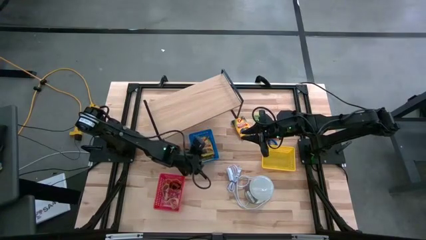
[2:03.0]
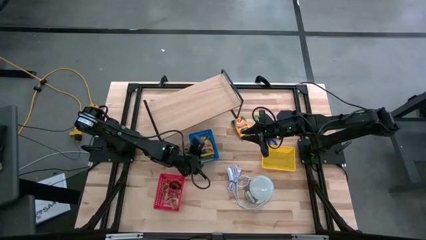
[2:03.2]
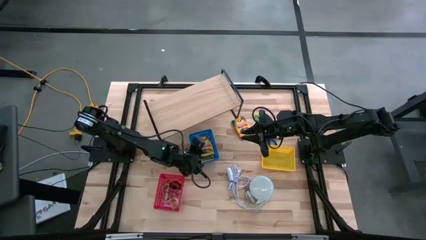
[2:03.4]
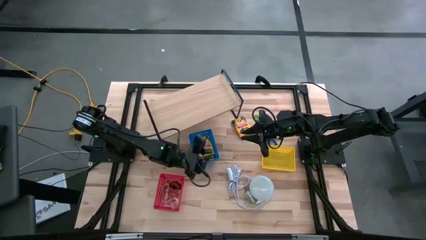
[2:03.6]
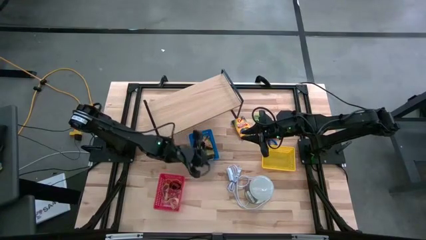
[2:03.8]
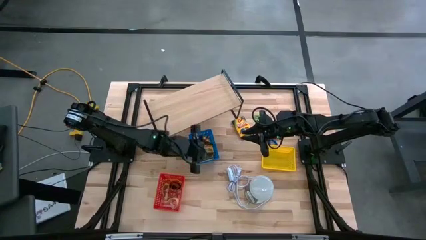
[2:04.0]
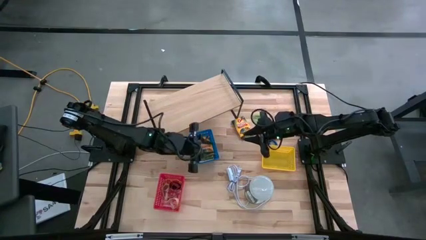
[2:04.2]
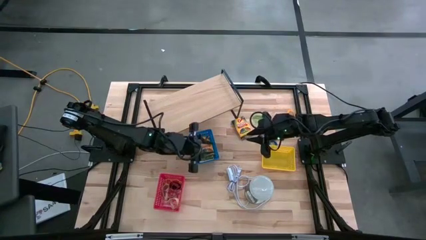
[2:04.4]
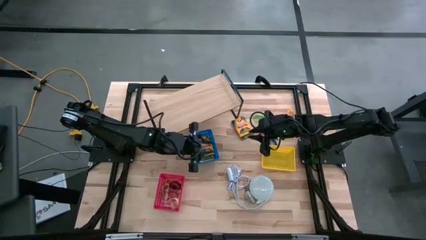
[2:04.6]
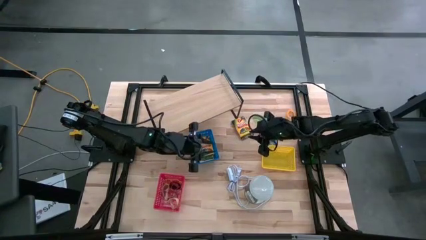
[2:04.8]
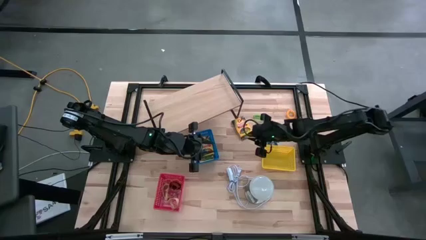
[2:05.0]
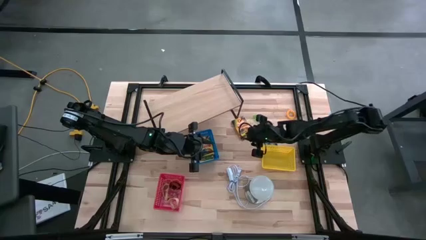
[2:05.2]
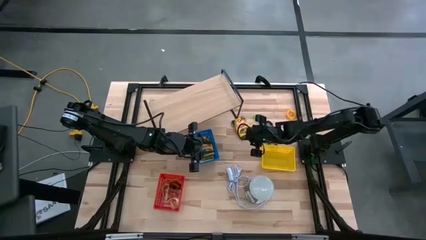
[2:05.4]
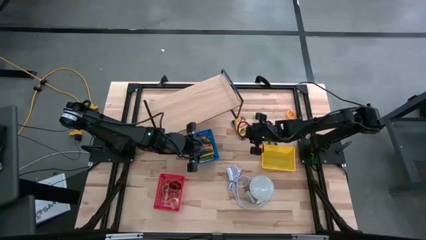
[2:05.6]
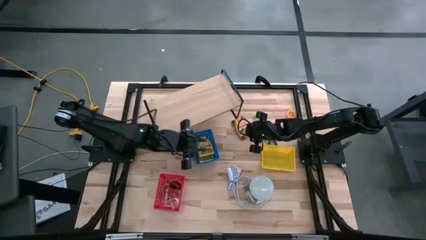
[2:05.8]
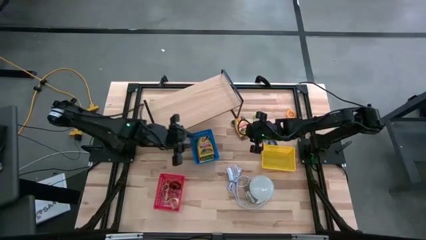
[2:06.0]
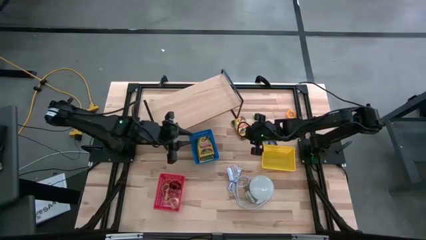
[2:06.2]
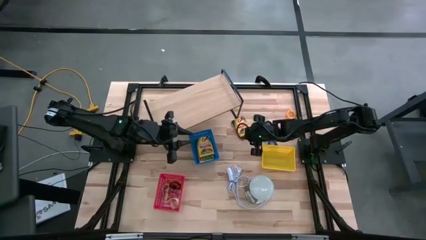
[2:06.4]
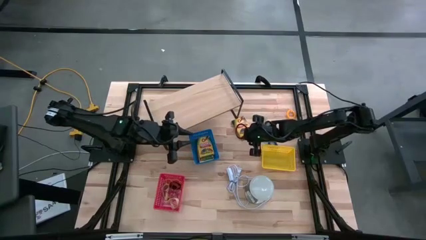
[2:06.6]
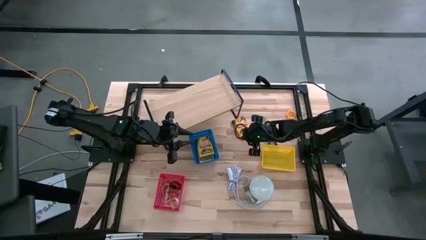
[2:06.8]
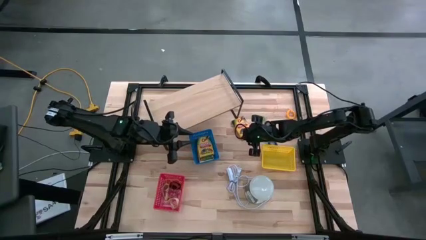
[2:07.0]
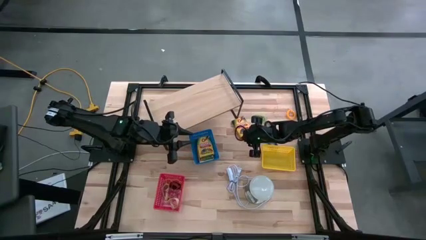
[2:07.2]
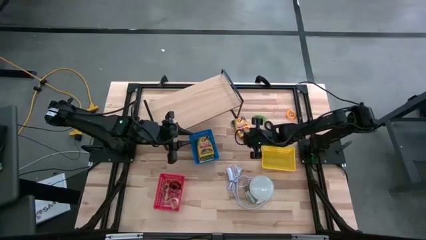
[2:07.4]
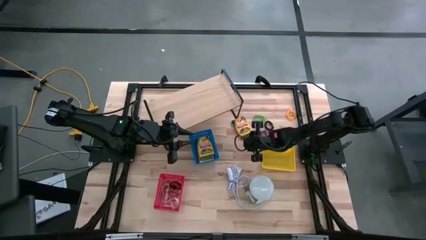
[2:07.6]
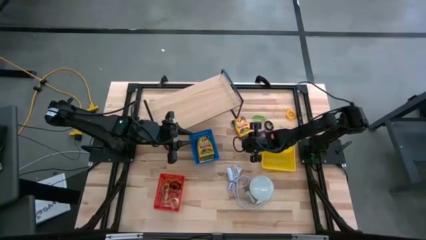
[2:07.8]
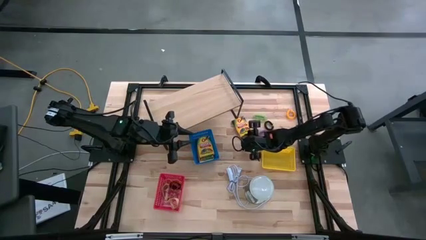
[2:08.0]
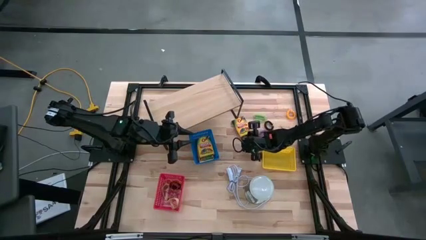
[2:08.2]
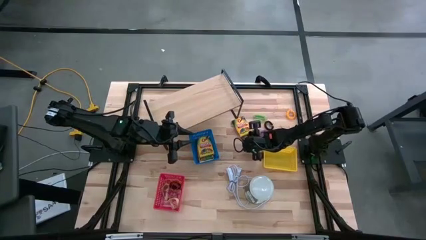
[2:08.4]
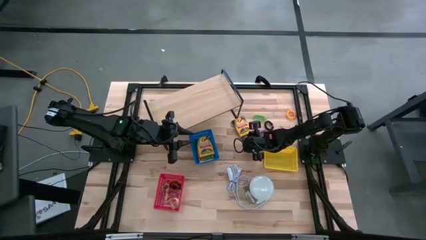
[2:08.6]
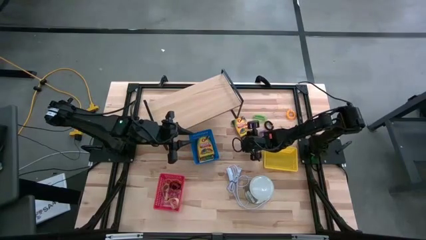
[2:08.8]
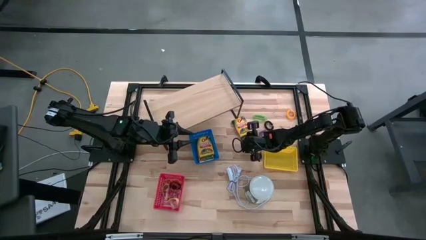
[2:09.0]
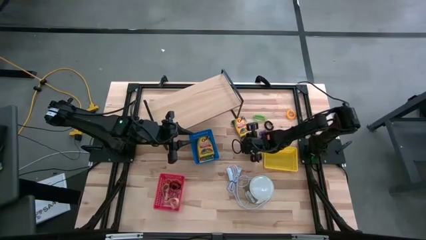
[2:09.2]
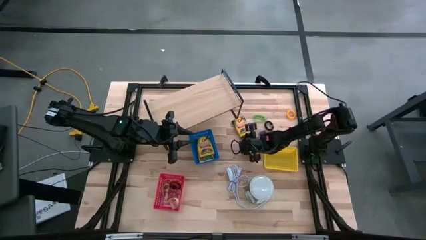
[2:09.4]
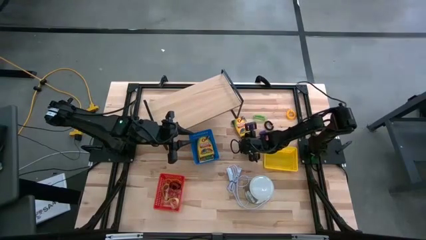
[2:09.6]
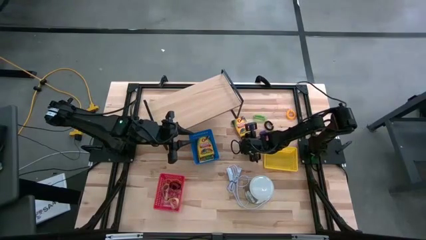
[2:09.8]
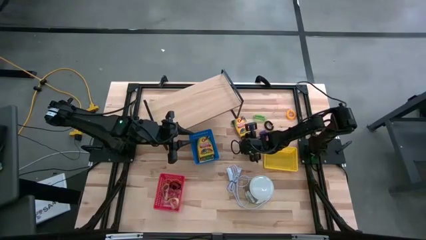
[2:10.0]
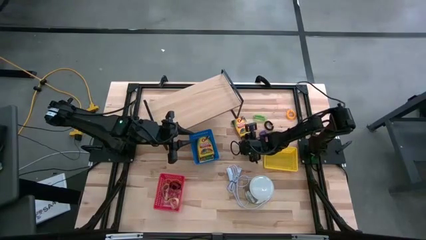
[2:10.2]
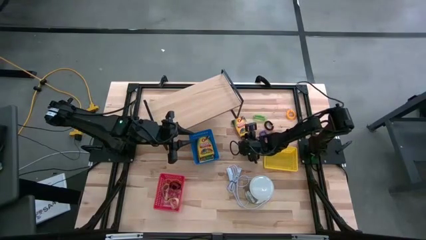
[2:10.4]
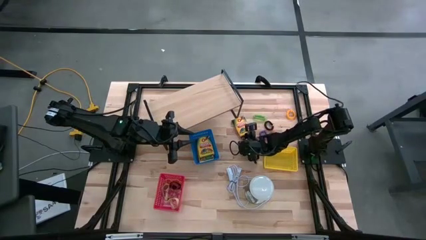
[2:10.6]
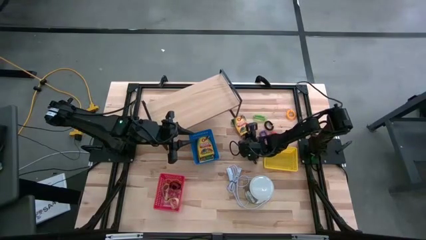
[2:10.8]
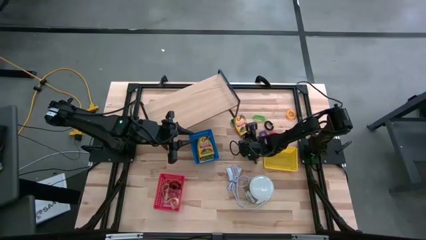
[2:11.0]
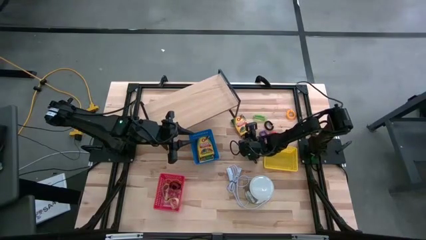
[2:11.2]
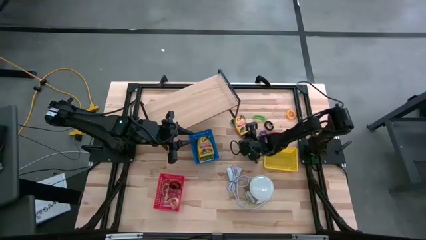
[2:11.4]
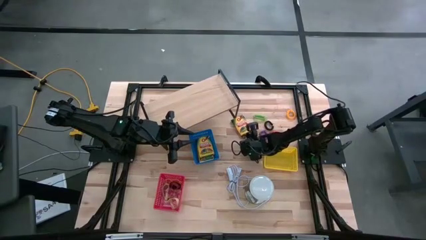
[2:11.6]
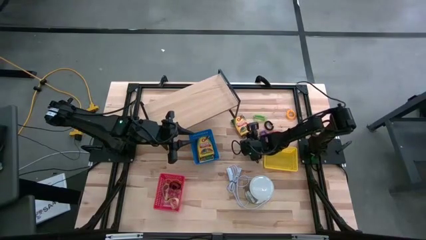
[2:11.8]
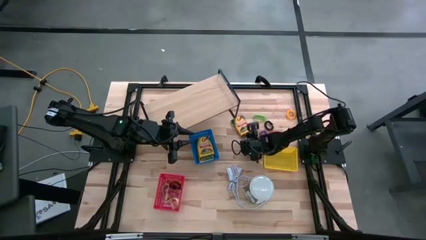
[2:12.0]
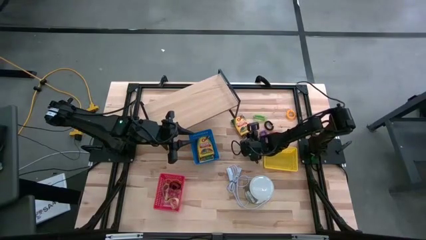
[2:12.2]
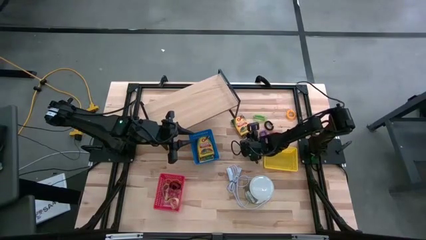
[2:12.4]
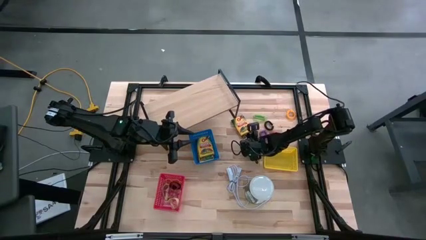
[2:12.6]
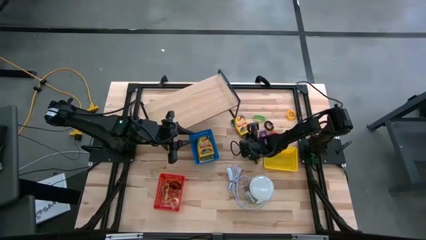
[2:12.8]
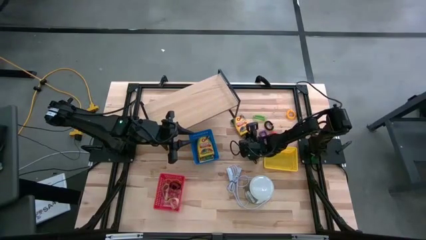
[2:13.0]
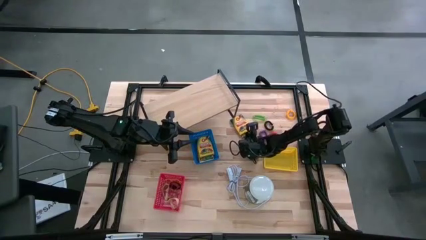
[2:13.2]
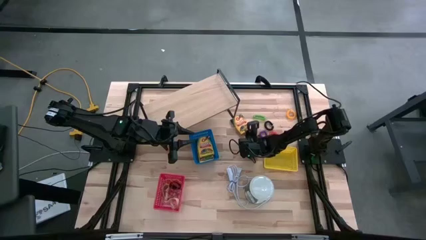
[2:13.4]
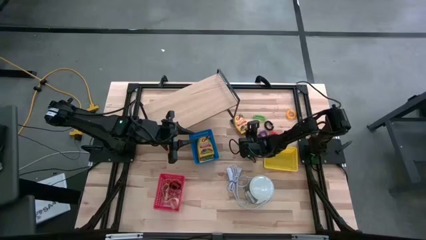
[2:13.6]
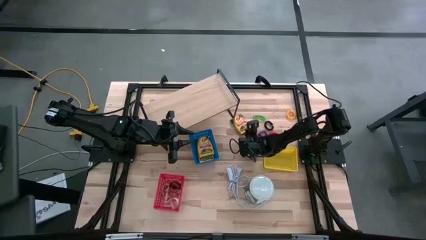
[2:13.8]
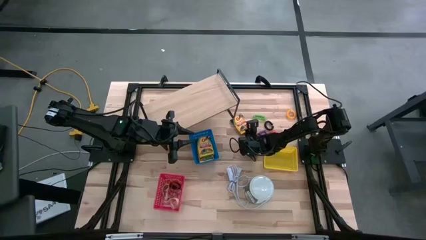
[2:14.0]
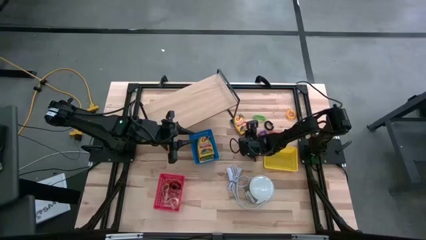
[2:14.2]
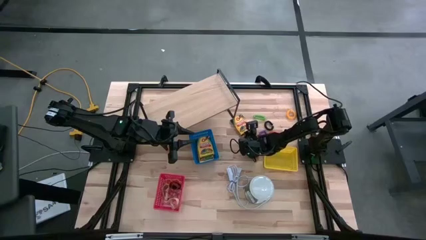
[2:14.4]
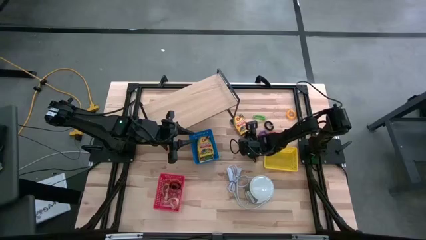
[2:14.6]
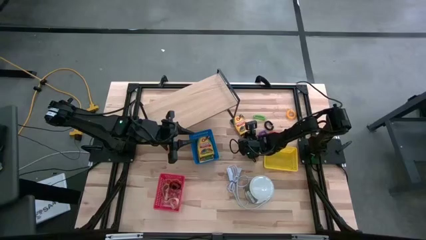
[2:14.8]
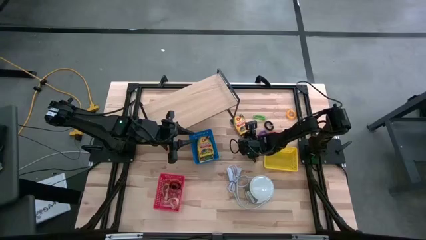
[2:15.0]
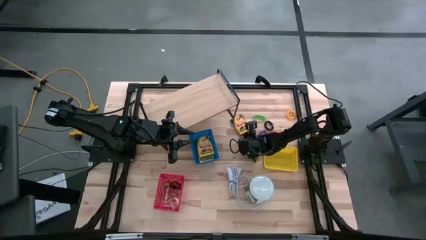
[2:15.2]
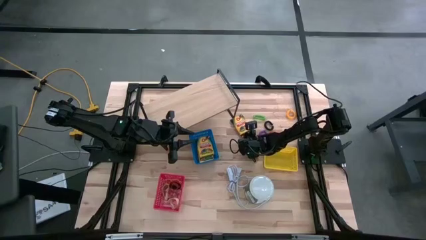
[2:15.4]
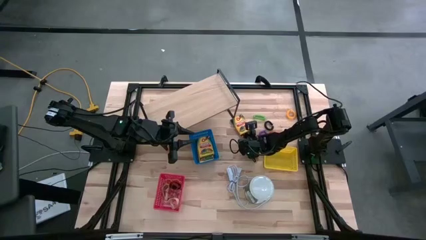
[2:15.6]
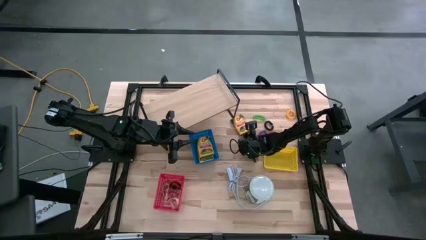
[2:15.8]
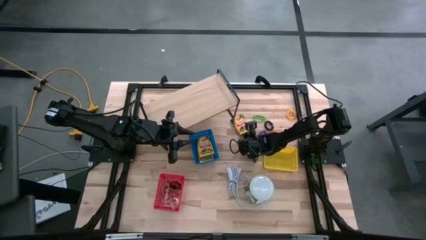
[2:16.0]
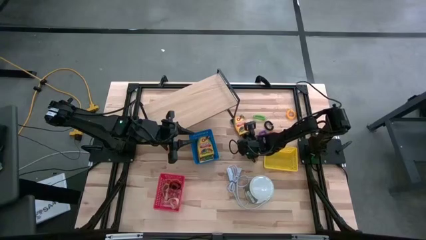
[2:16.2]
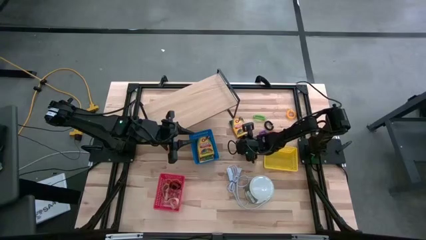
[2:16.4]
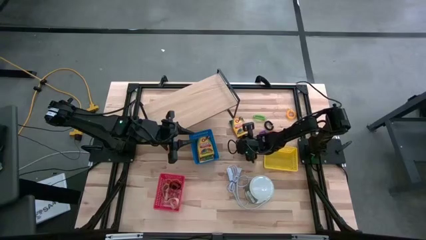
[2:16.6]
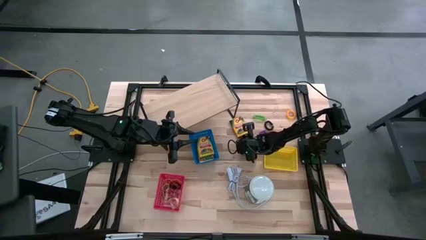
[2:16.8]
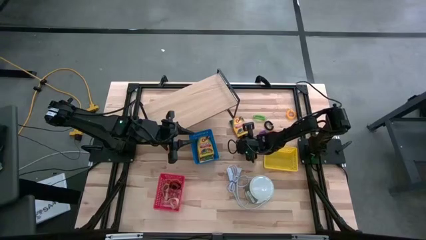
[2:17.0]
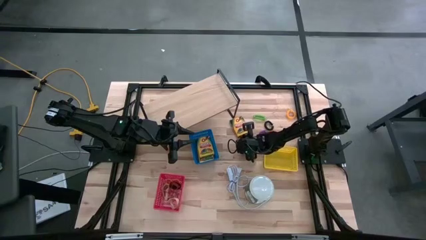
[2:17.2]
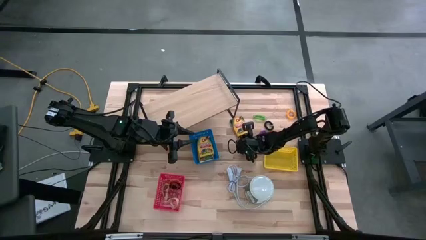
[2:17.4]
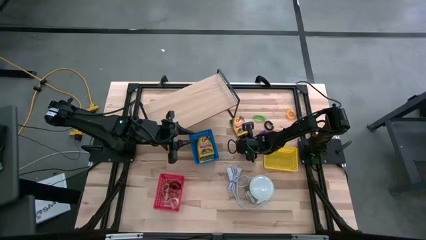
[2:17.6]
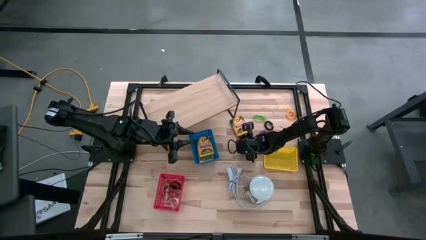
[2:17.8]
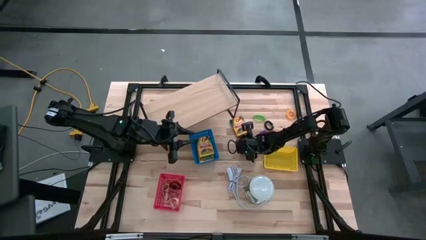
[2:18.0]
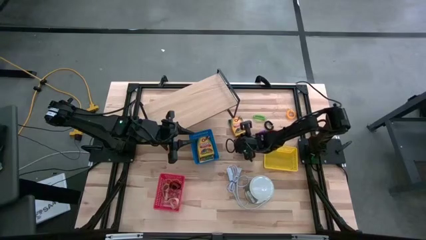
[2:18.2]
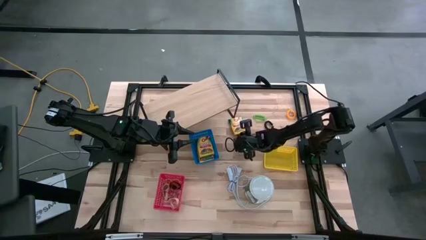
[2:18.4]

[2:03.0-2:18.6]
Task: Pick & Place Office Desk Supplies
Put the yellow pack of crayon into the blue bin

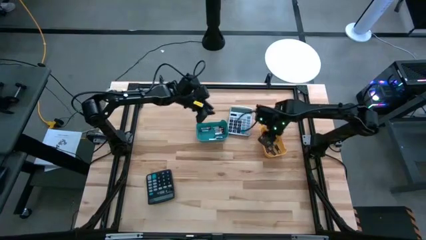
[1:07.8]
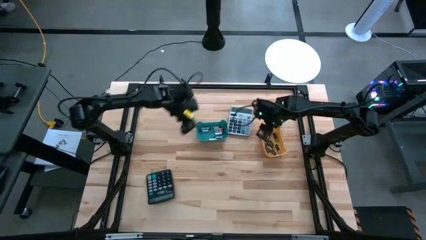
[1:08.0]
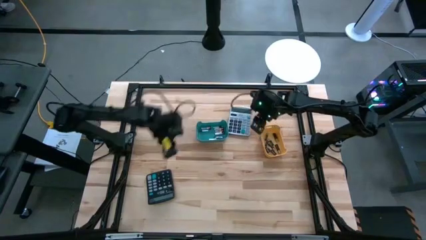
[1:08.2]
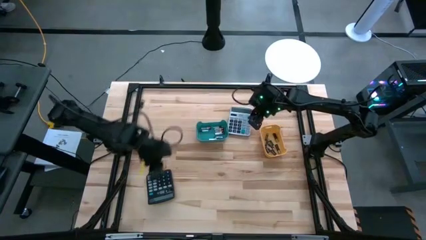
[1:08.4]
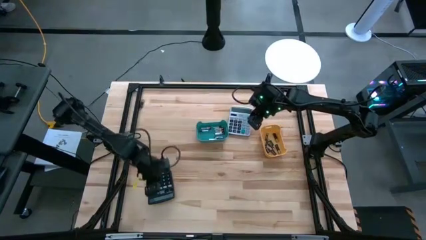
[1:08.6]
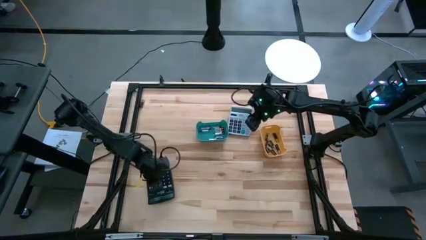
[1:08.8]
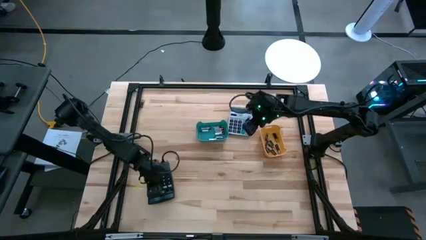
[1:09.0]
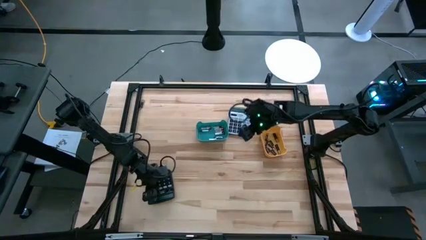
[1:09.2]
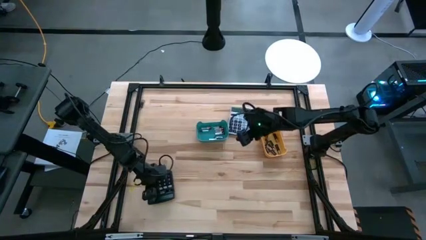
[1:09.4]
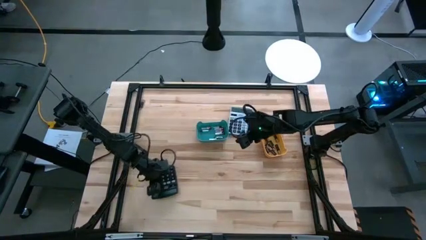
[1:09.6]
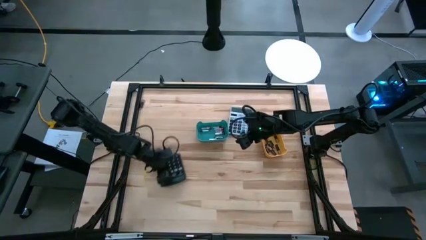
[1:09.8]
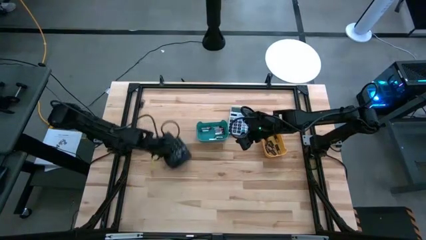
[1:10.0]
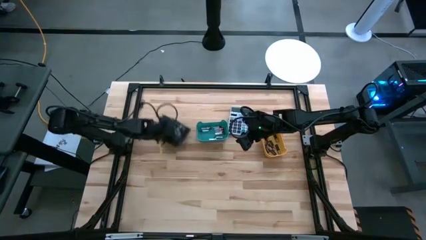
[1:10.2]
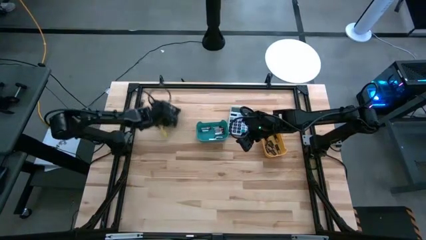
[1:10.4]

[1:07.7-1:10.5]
Task: Sort batteries
Move the black calculator to the top left of the table
